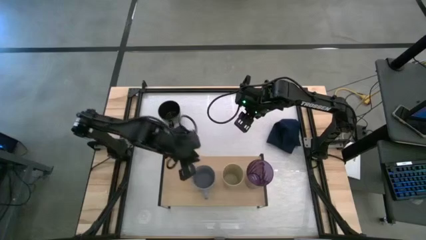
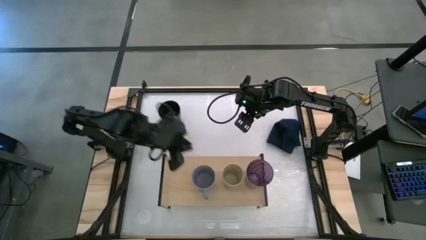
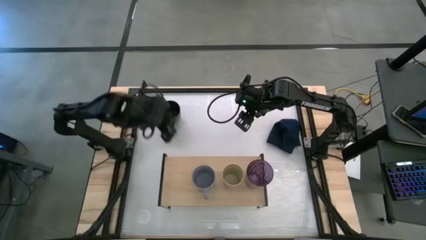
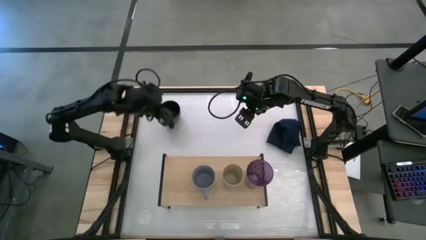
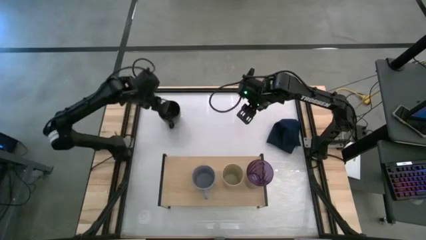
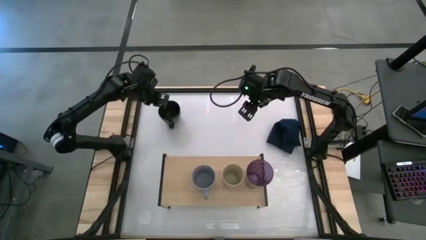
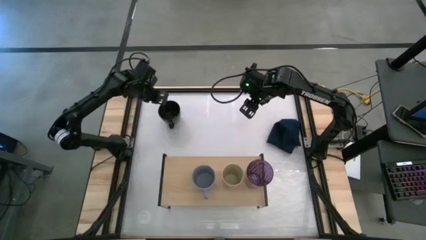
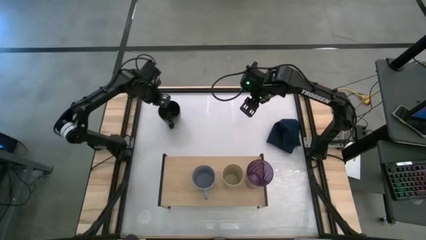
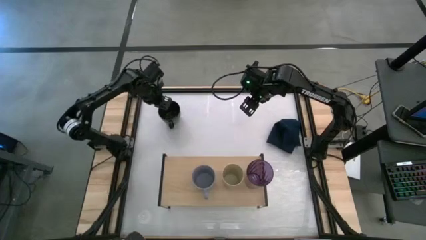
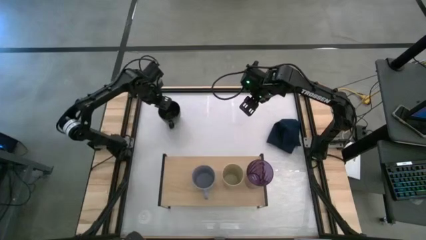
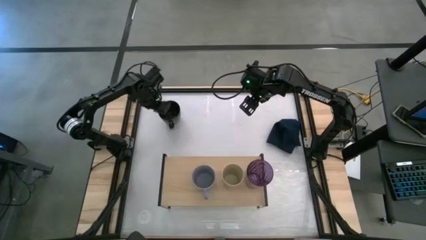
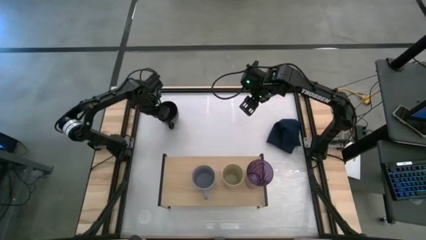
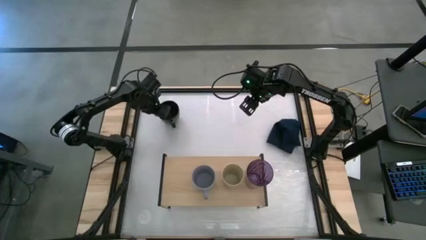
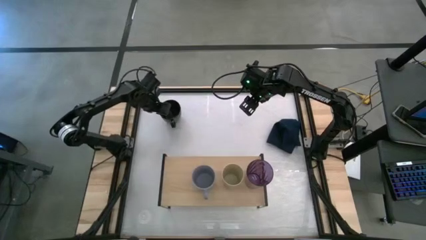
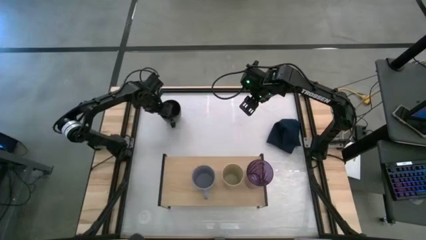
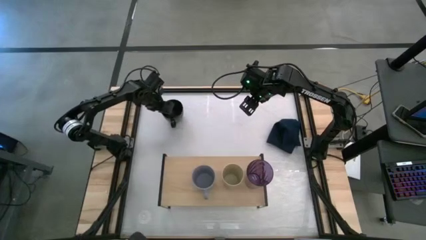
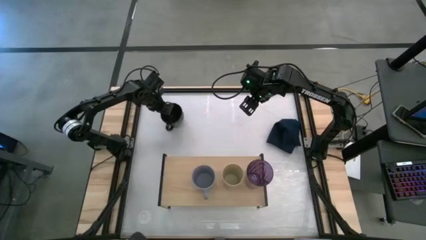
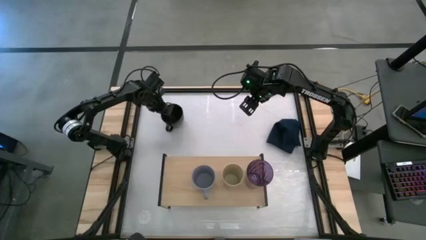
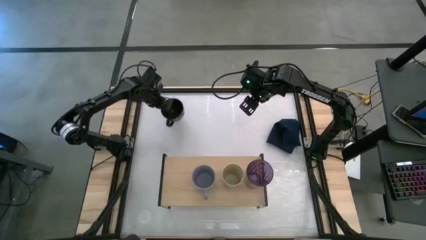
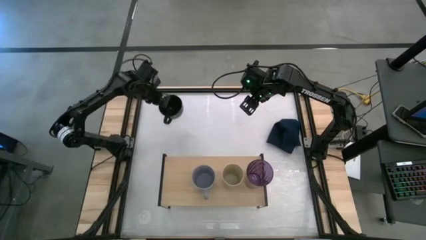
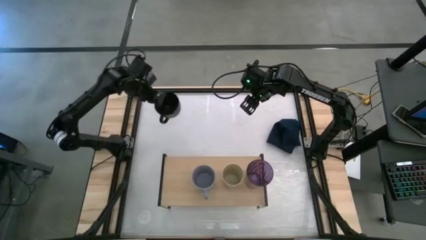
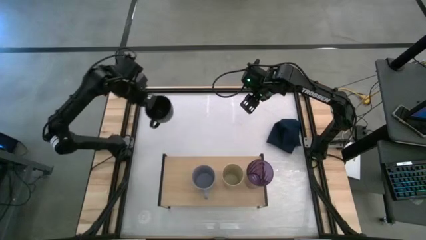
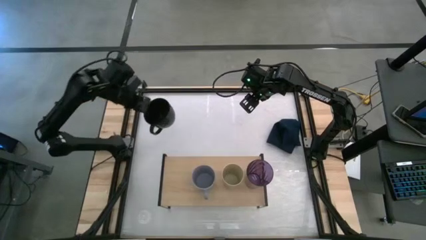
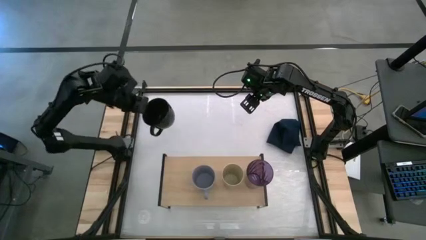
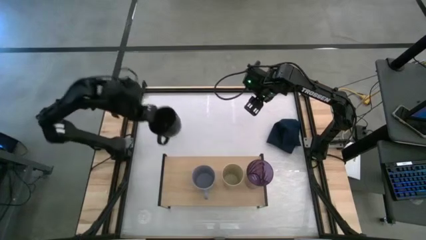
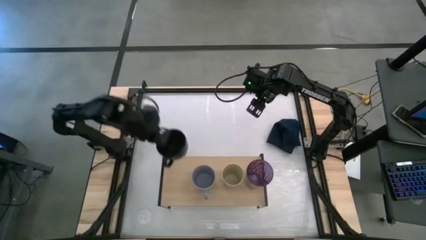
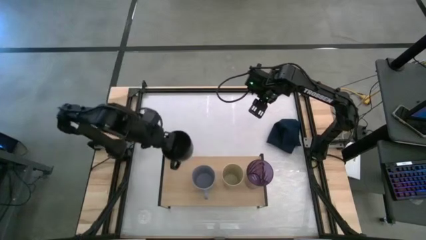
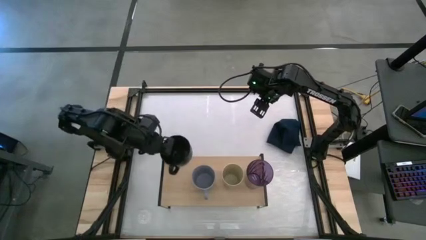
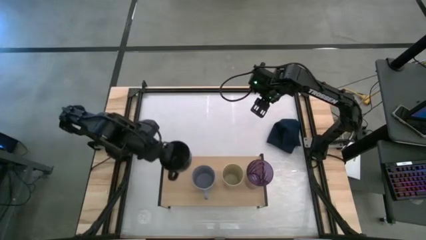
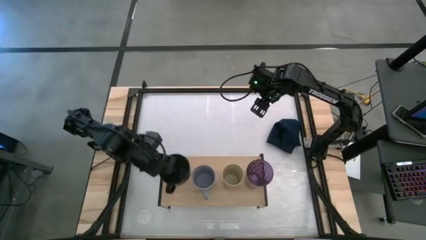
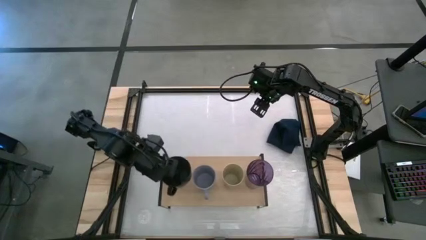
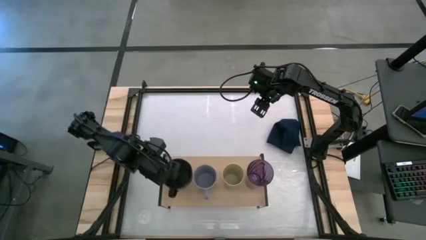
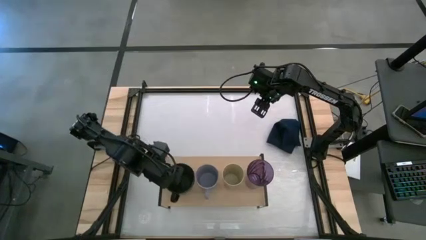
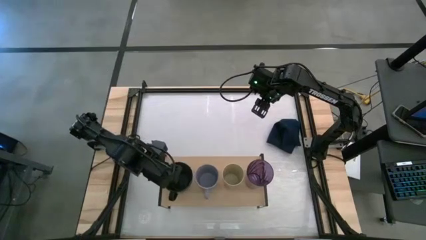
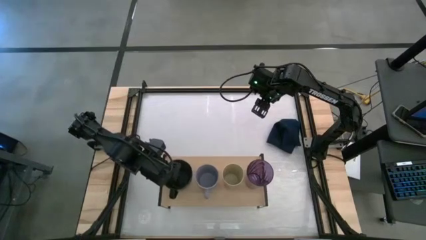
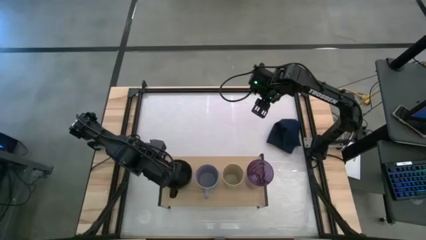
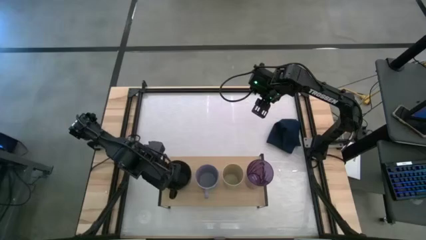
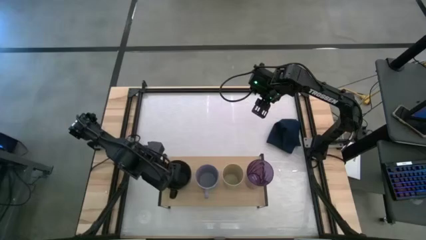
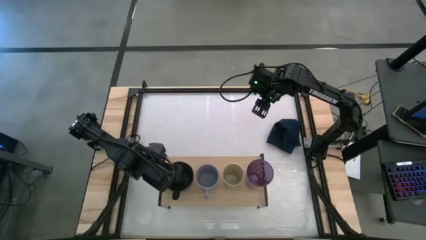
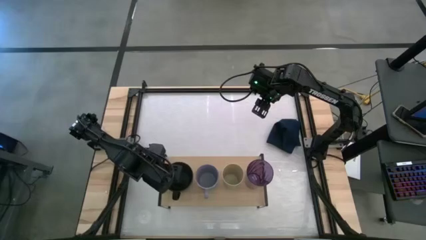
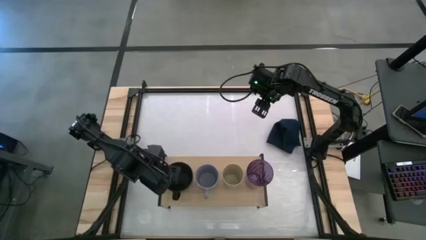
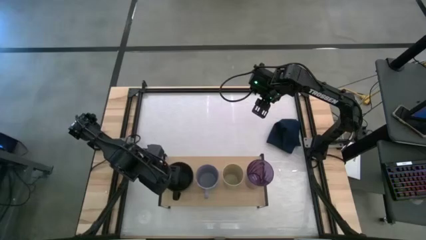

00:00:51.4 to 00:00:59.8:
Task: Stack small to large cups/mugs on shelf
Put the black mug on the shelf

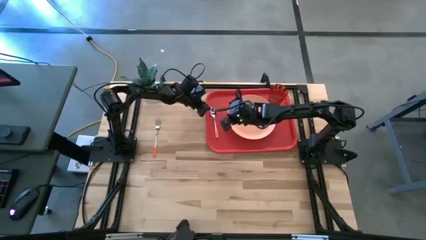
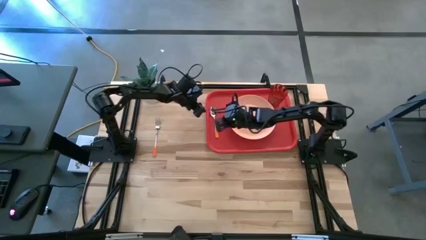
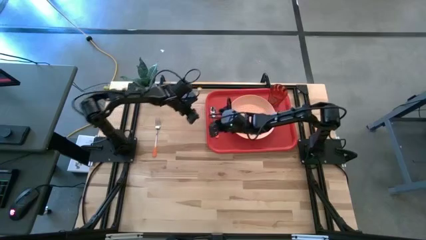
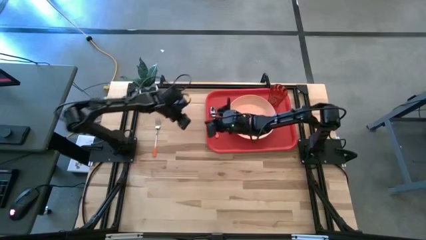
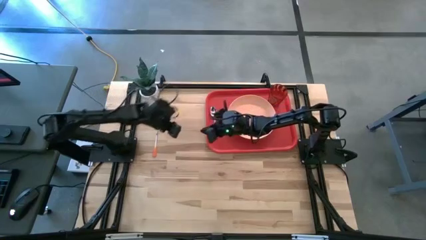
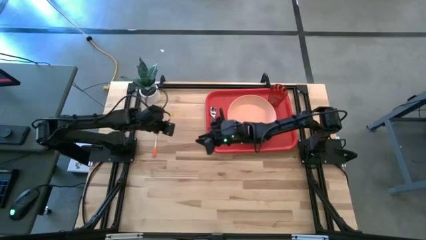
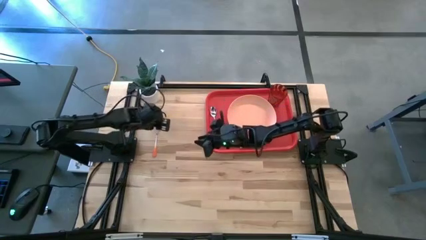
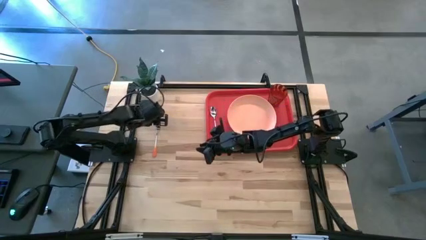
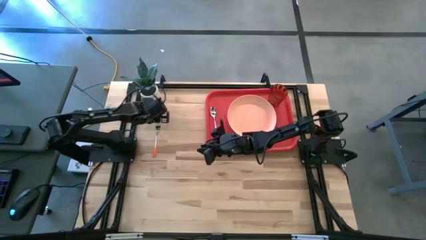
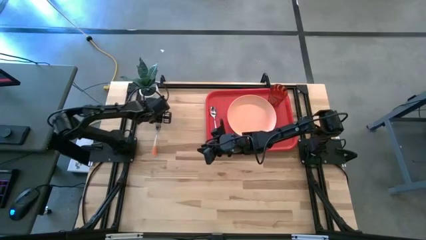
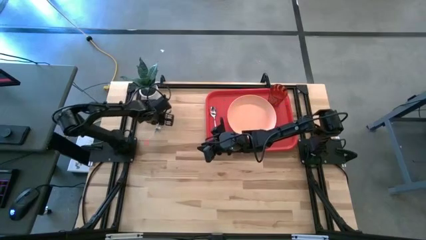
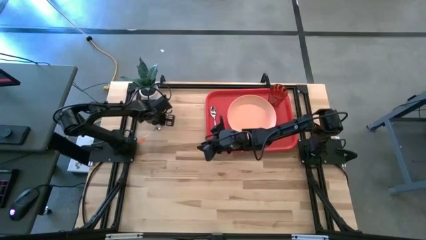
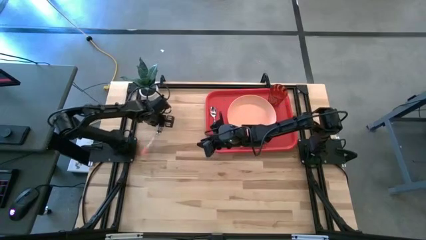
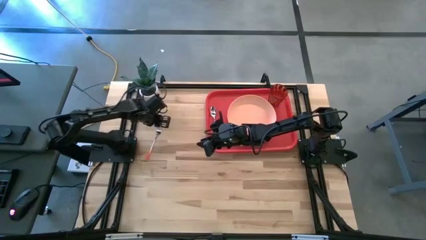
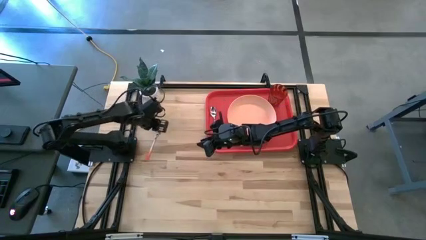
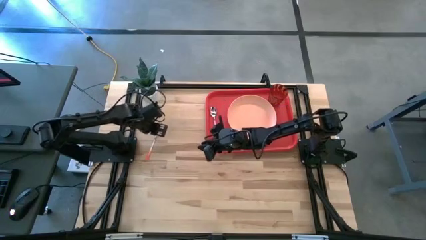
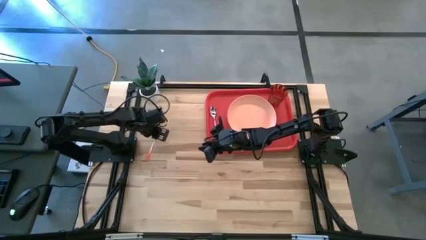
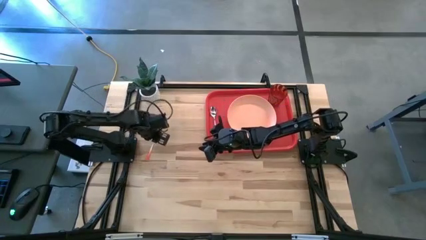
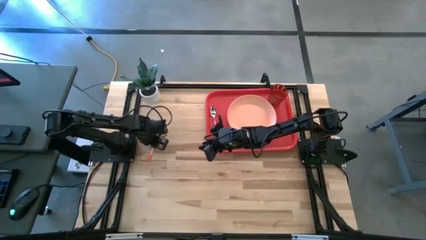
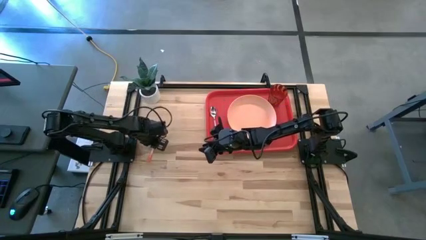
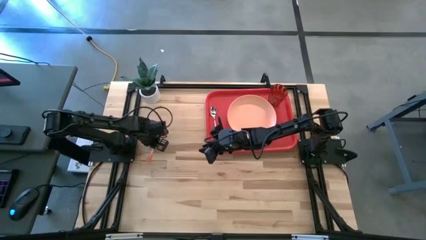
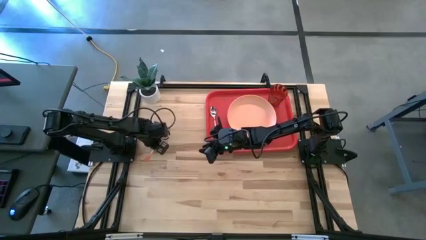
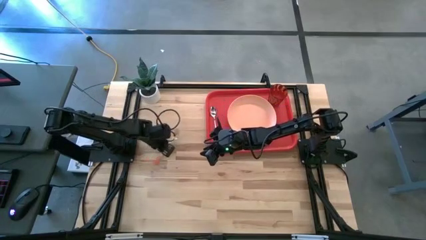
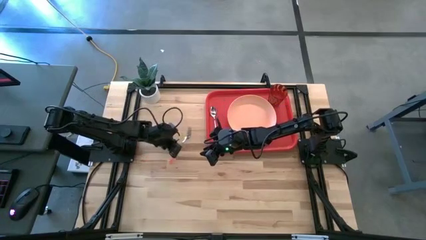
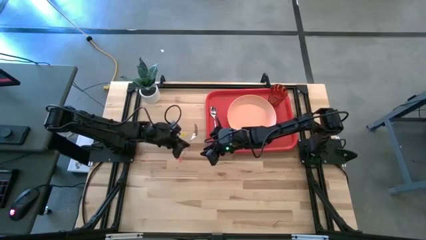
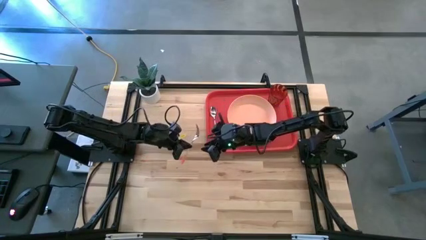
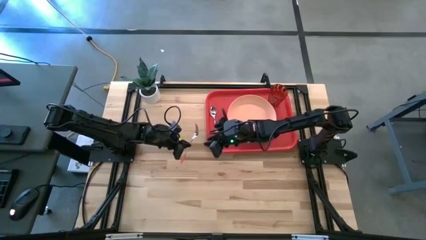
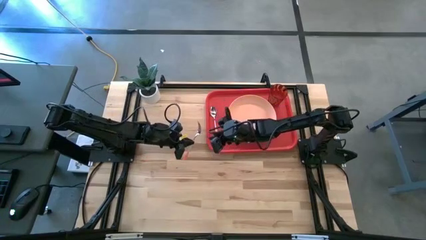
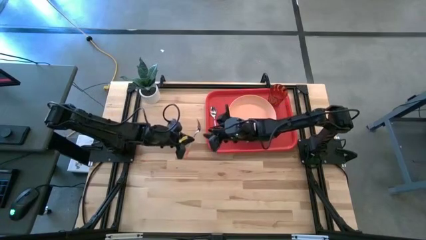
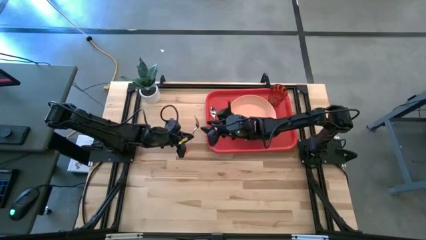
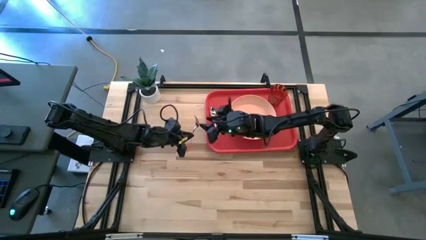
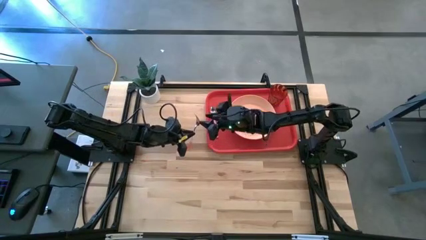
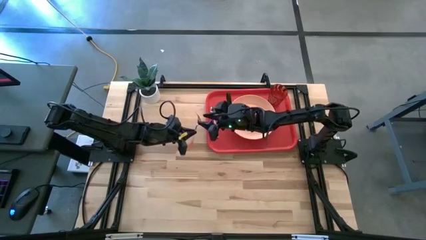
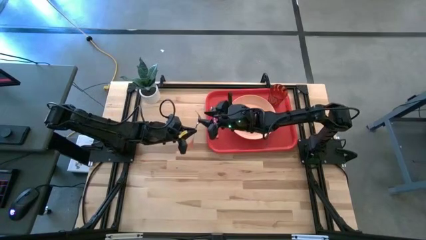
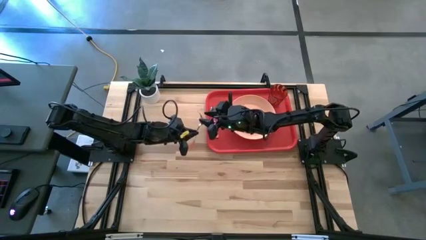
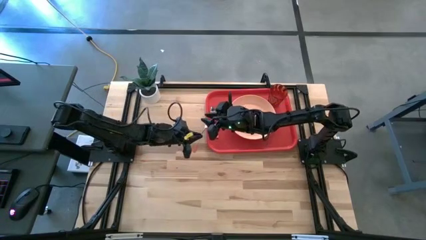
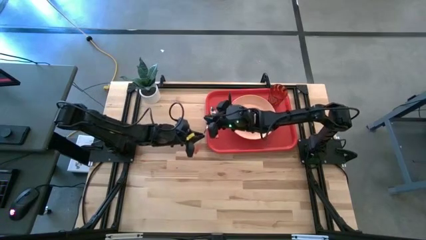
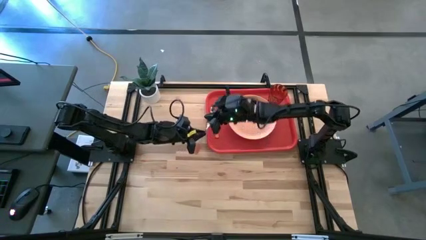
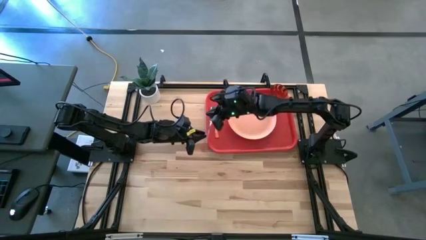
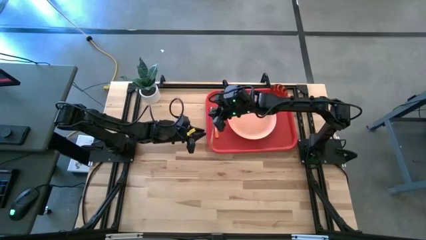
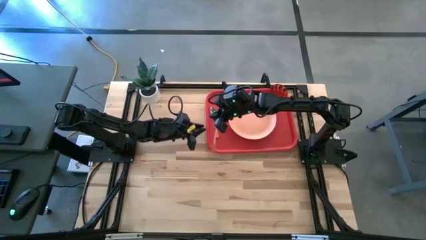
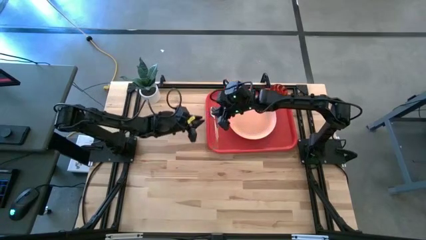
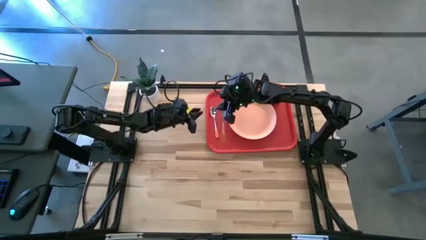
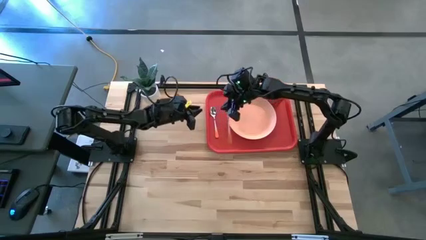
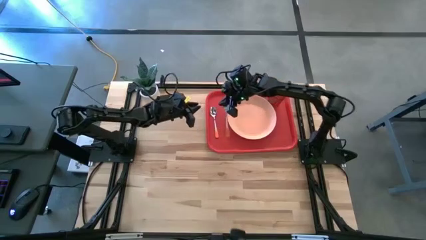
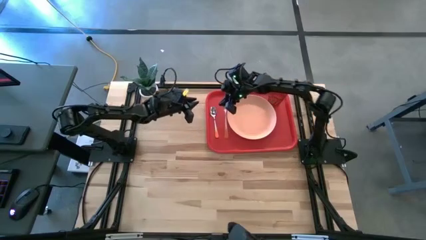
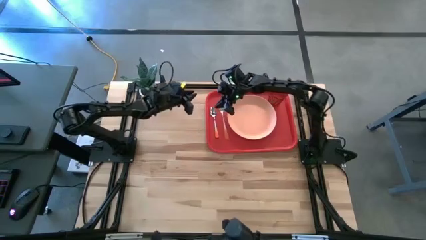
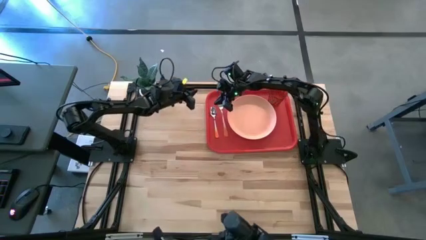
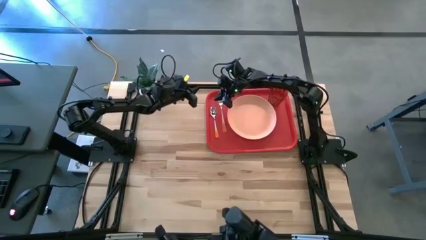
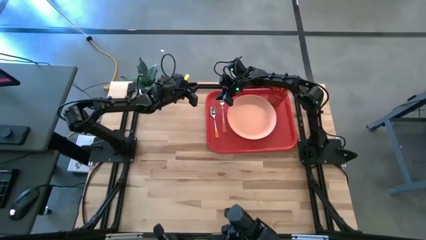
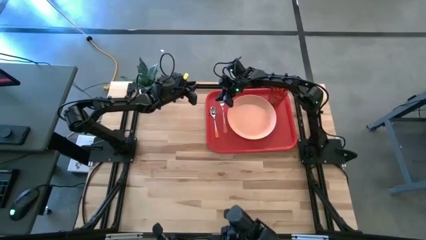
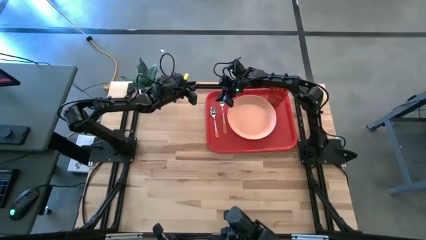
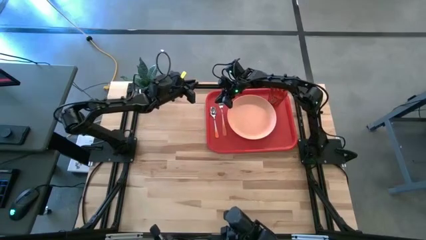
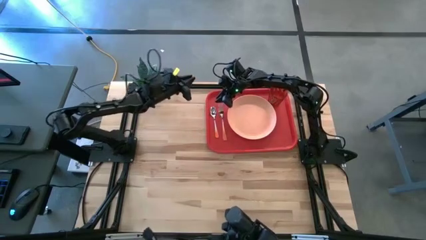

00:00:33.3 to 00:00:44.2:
Task: Pick and place plate/cup/fork/spoon on tray
Put the orange fork on the red tray in between the orange spoon and light pink plate
